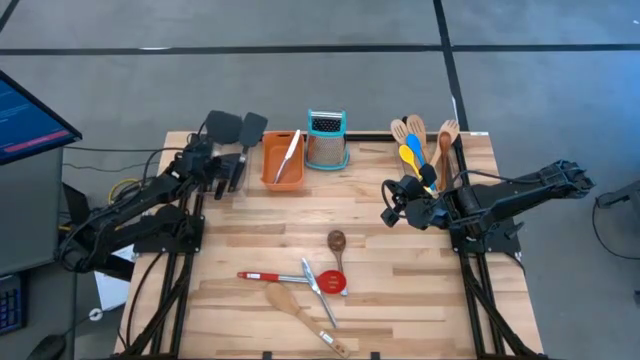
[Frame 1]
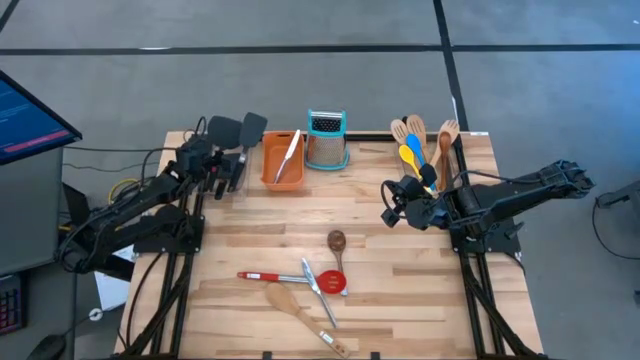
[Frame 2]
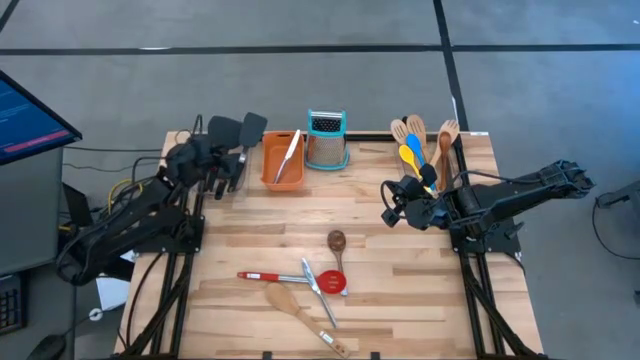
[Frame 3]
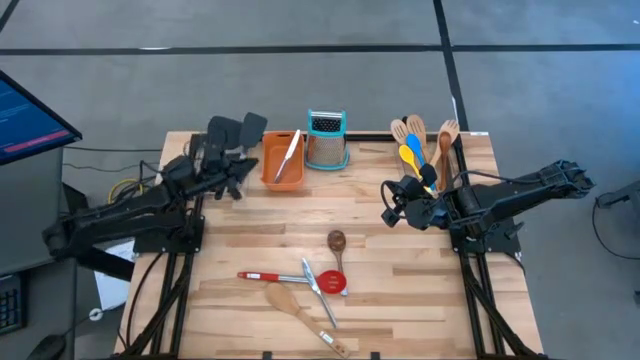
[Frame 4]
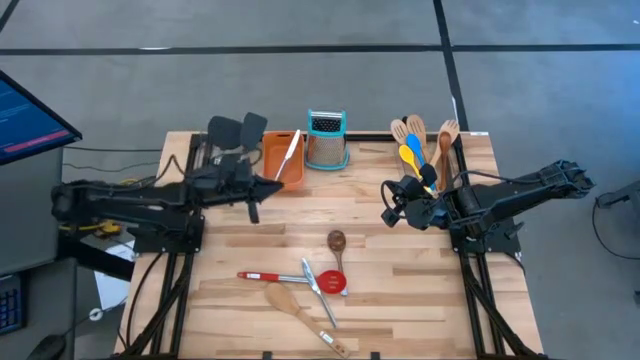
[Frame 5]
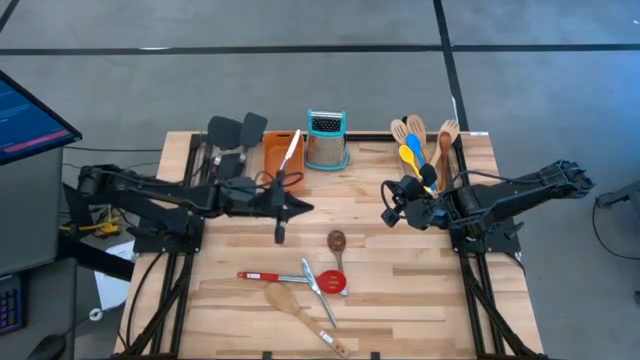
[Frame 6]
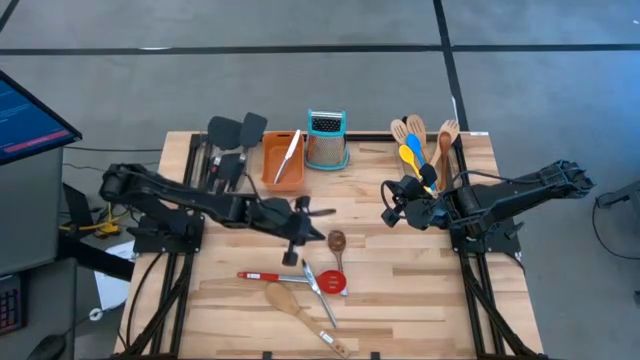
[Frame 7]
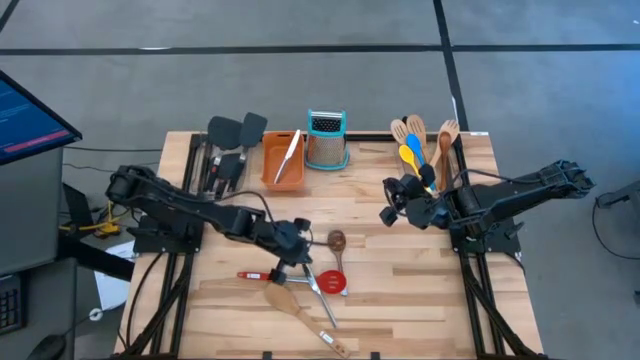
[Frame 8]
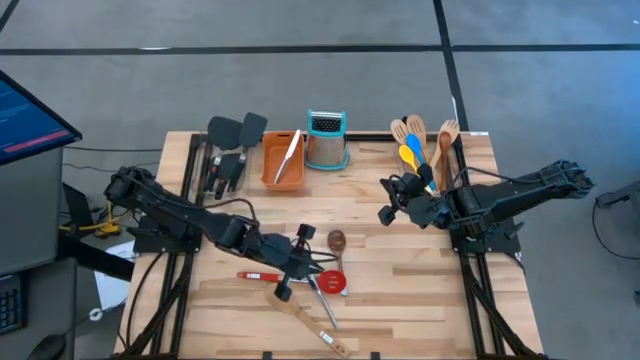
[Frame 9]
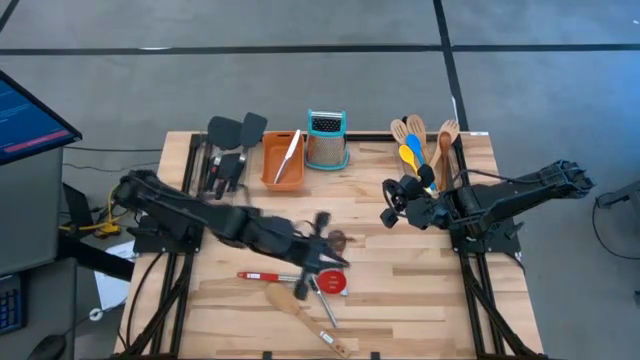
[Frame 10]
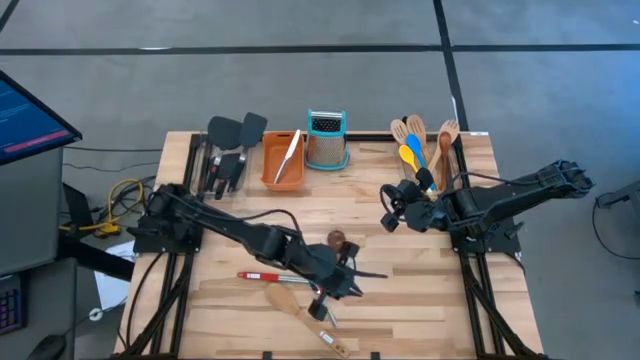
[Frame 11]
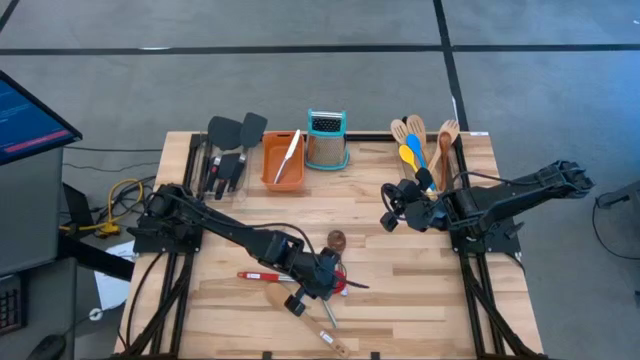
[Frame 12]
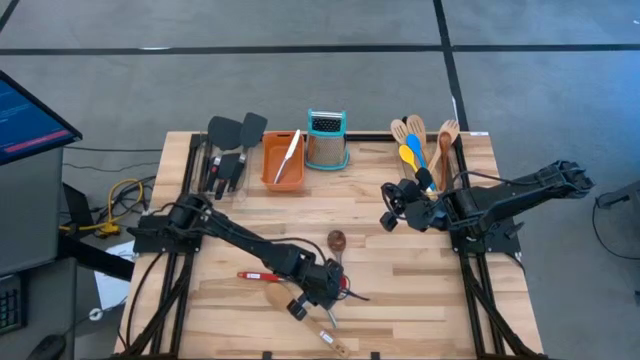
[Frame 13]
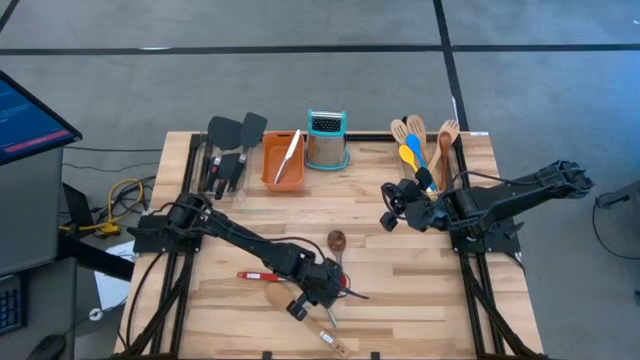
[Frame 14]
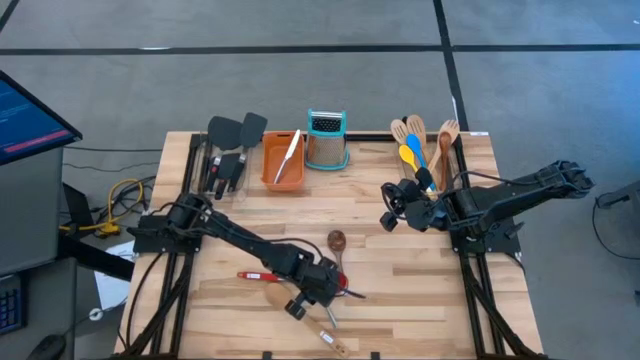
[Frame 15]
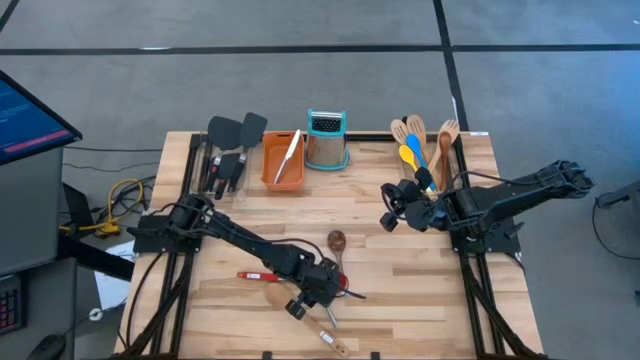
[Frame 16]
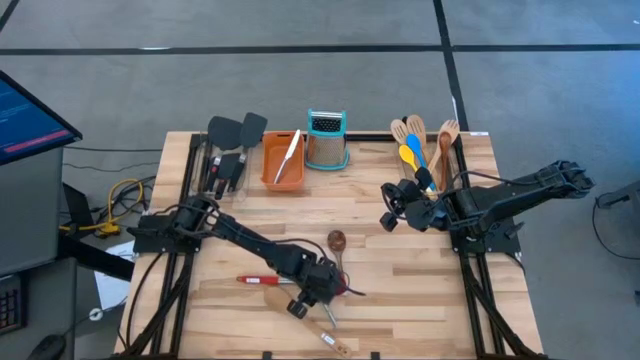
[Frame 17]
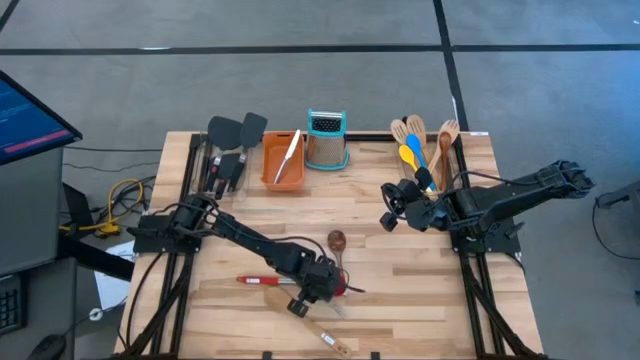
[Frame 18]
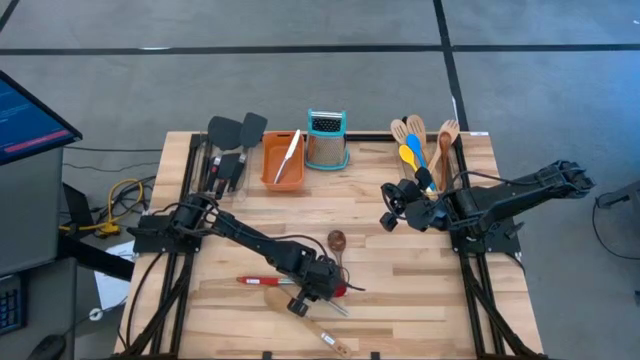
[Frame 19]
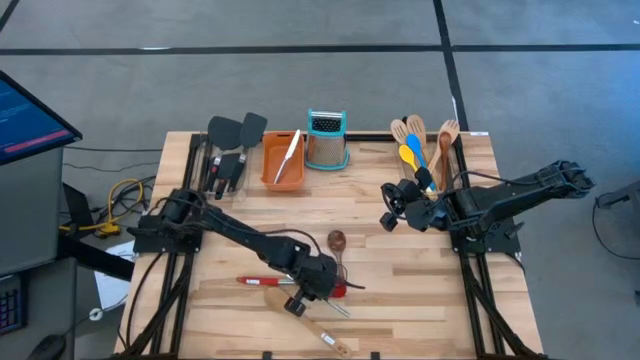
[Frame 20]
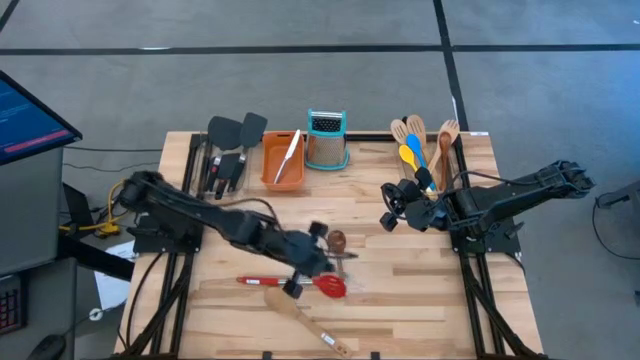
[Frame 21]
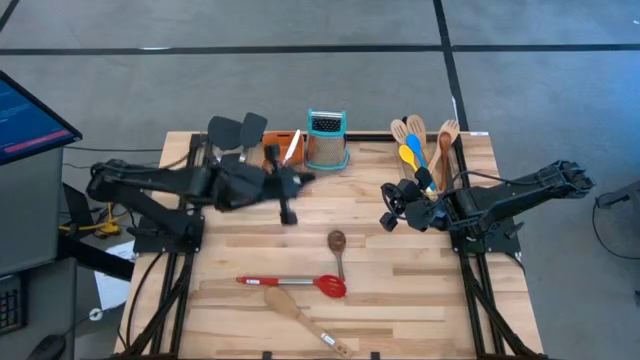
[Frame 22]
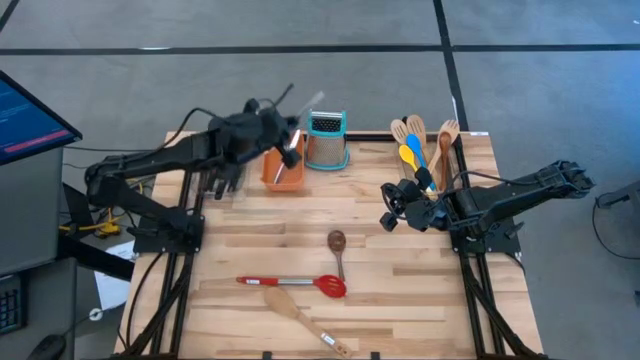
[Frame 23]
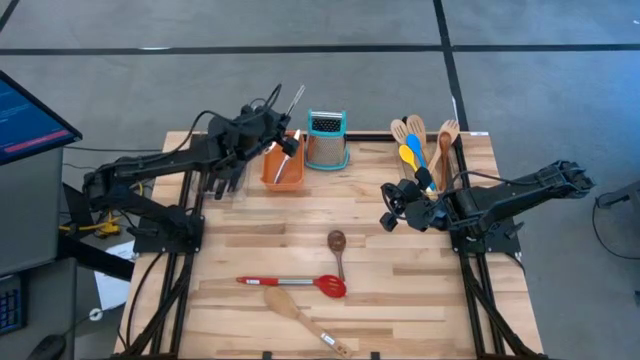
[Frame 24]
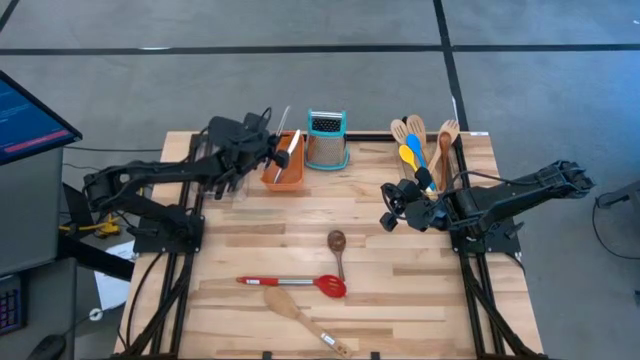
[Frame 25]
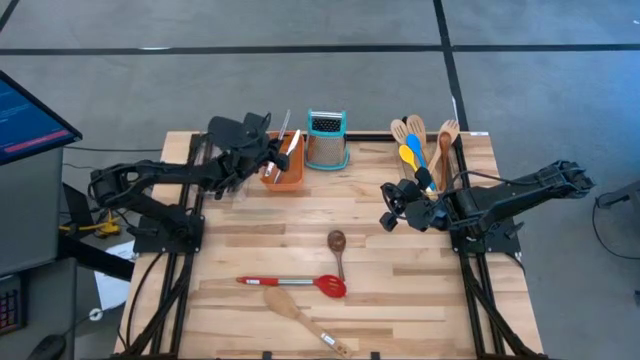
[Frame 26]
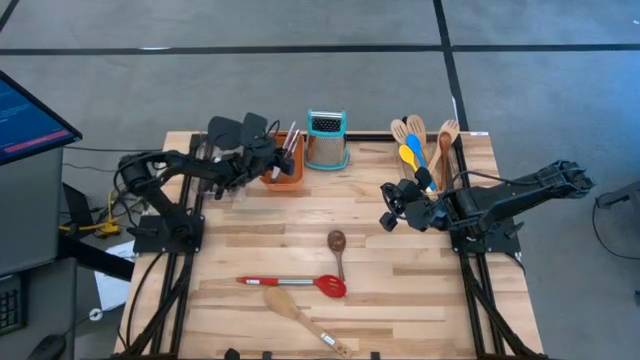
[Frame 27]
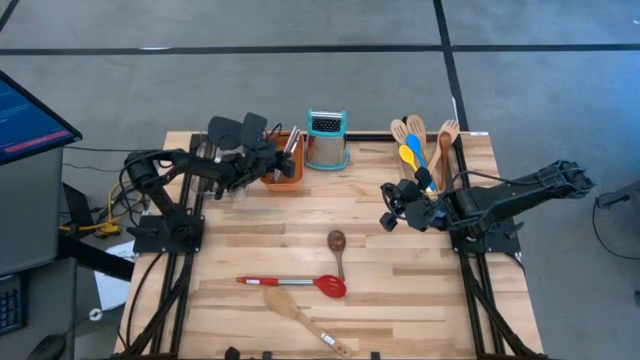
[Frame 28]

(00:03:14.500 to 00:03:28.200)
Task: Pick & Place Kitchen Items
Put the silver knife into the orange bin

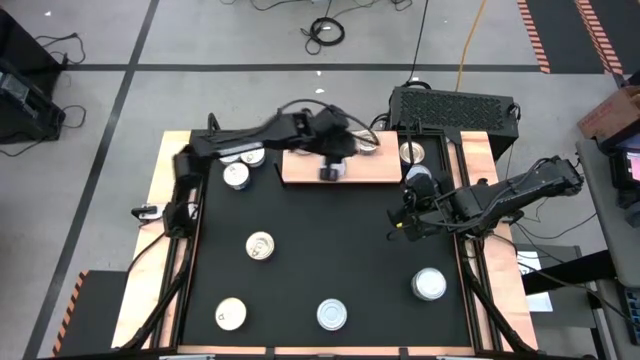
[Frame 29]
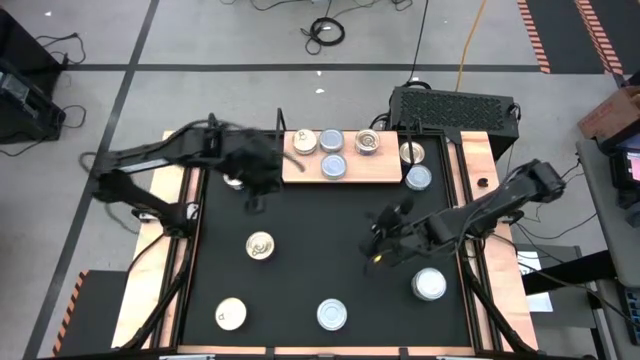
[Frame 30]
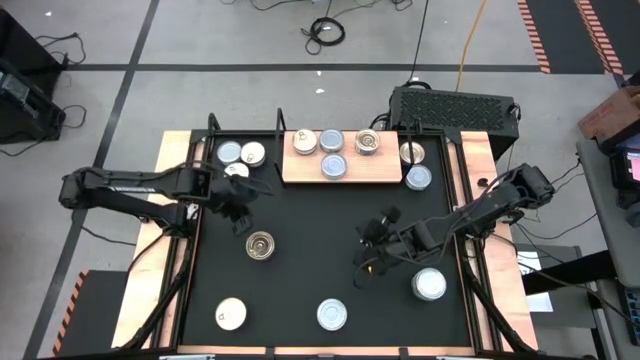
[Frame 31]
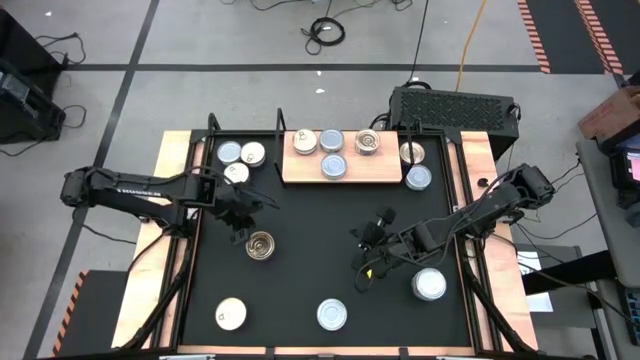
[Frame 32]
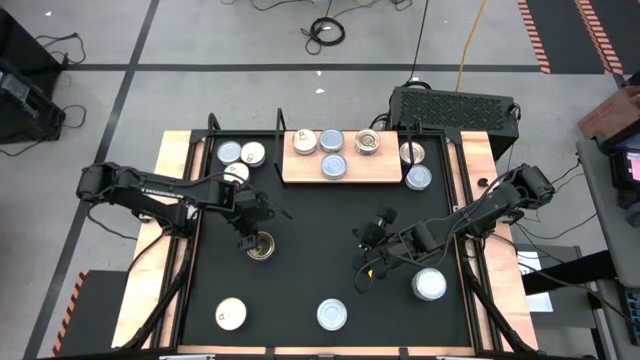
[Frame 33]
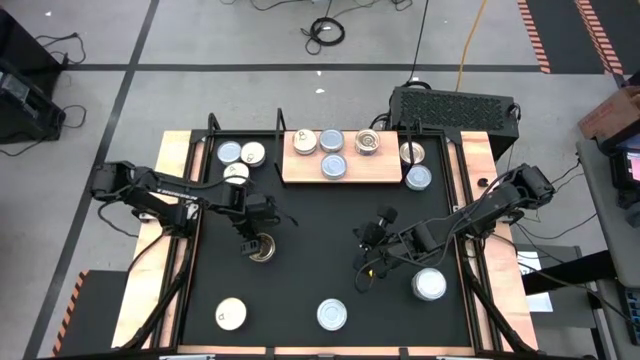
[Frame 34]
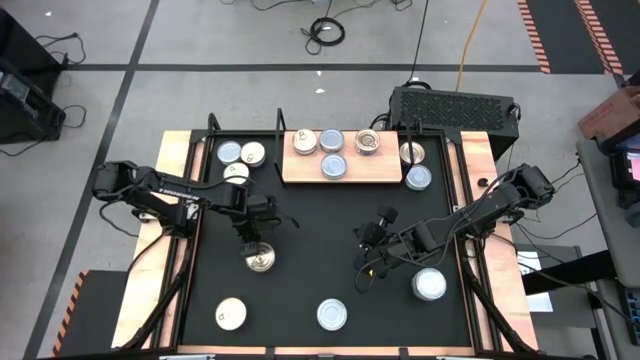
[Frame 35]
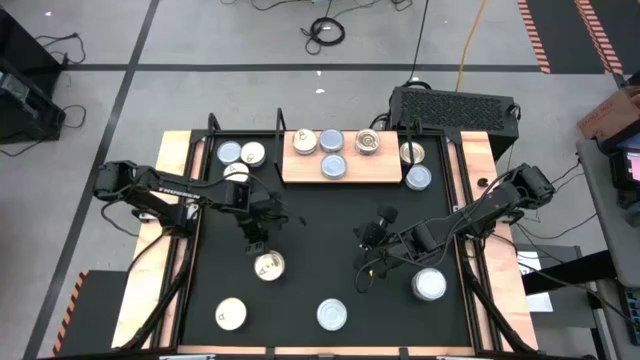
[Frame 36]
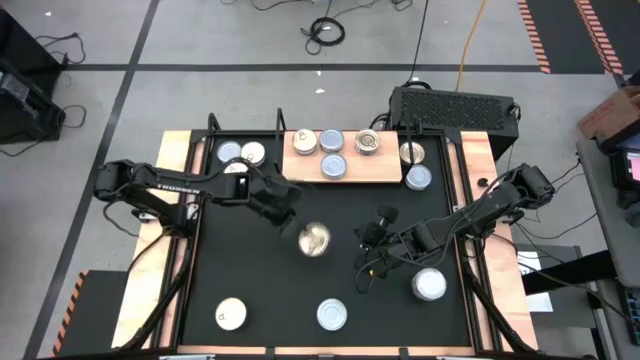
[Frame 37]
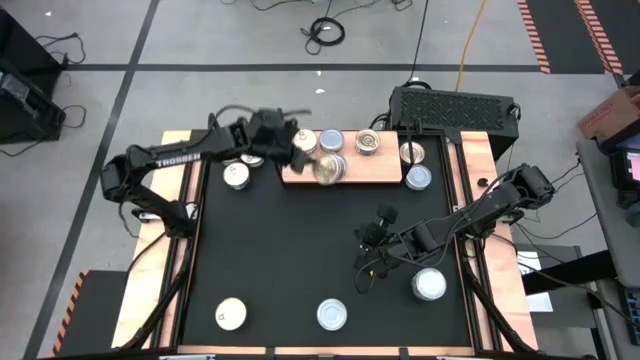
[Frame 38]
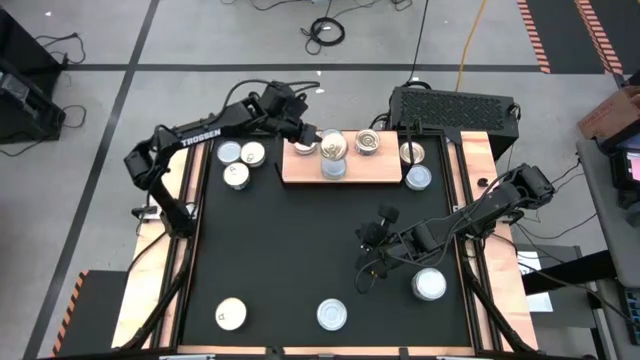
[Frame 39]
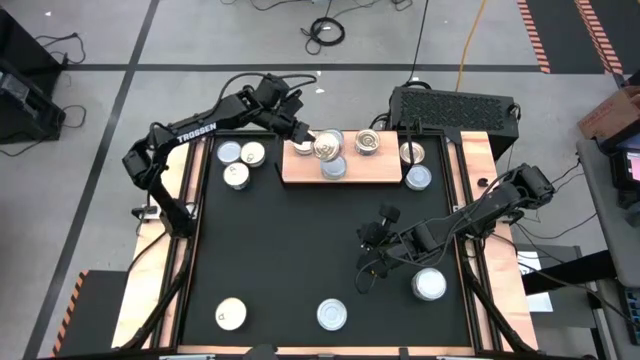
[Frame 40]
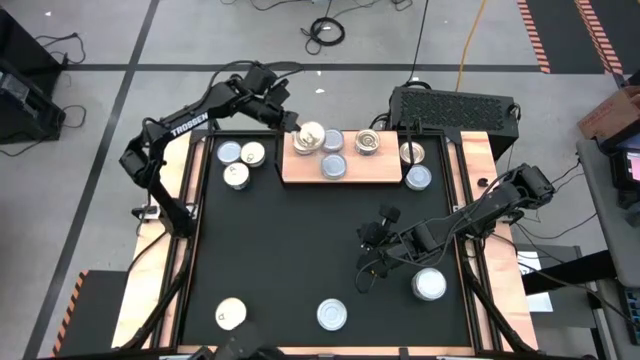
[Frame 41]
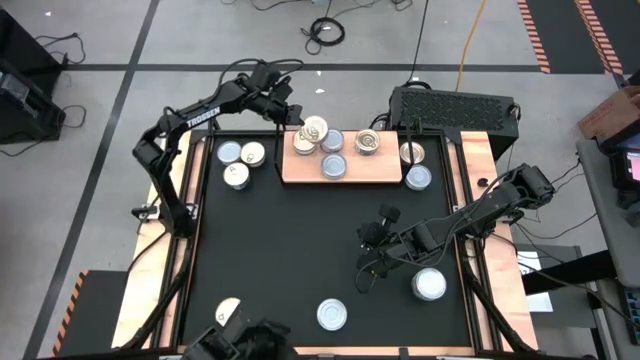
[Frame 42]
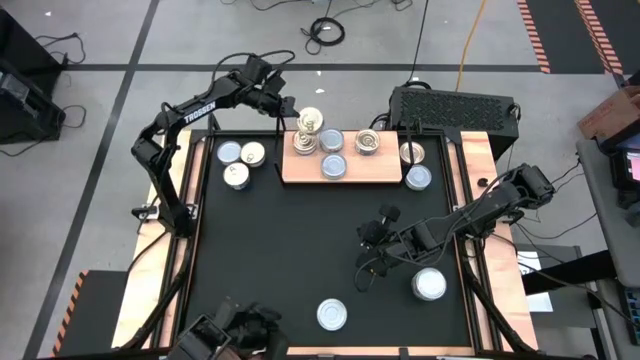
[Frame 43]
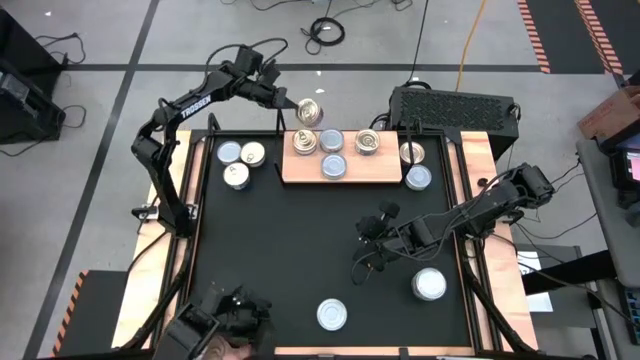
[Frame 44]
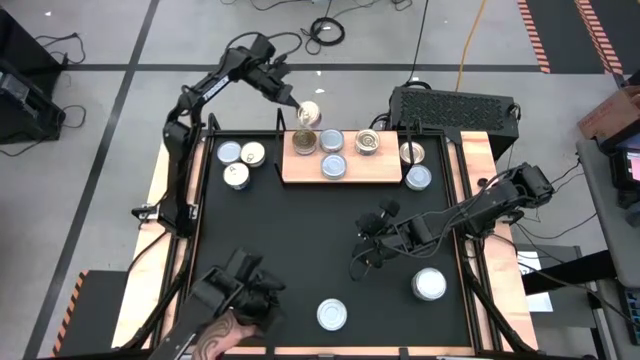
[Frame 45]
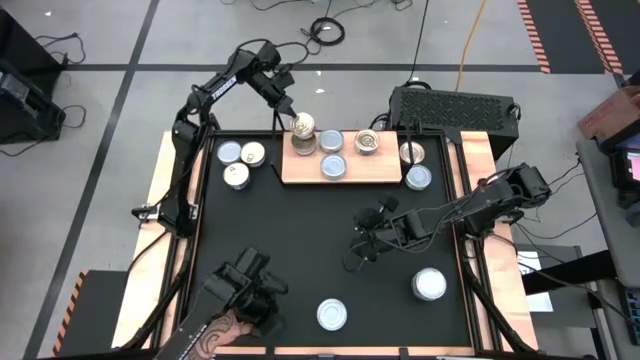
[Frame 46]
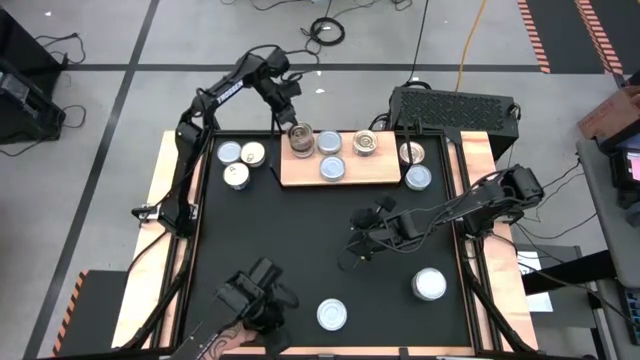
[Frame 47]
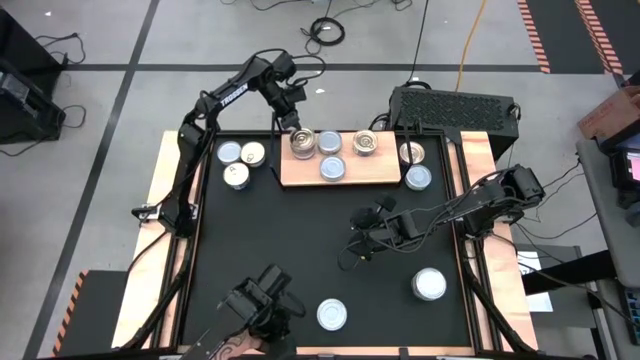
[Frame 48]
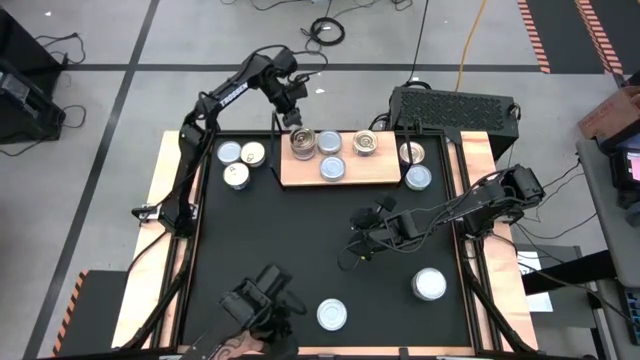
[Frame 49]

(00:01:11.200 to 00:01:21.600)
Task: Stack canned seafood by type on shelf
Stack the bottom left blue tuna can on top of the blue tuna can on the shelf
